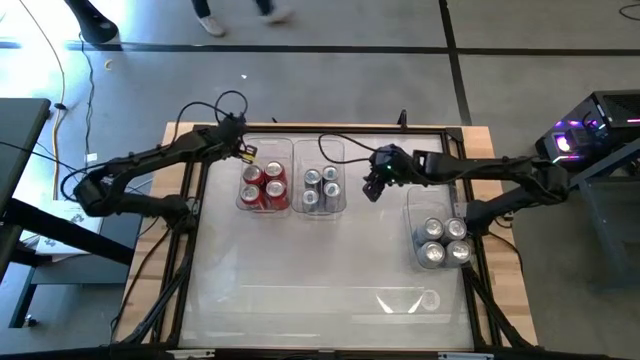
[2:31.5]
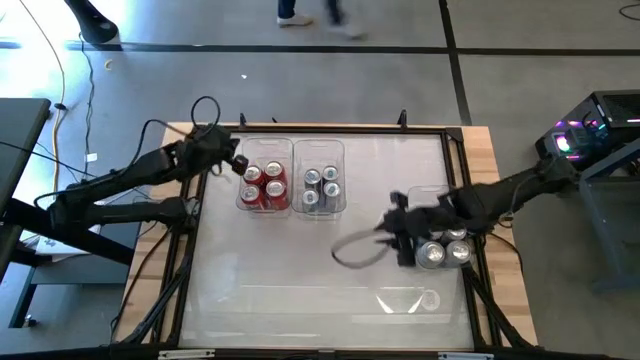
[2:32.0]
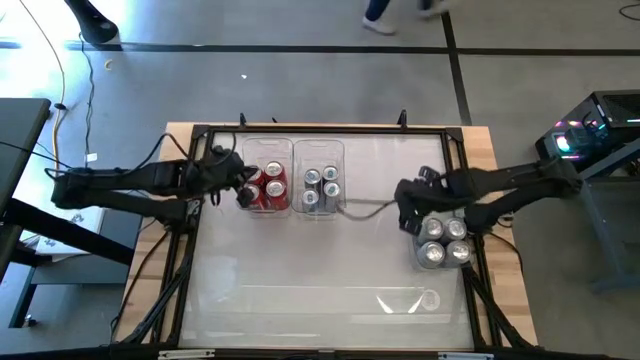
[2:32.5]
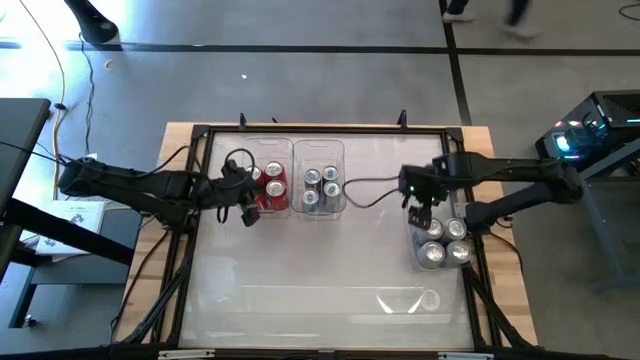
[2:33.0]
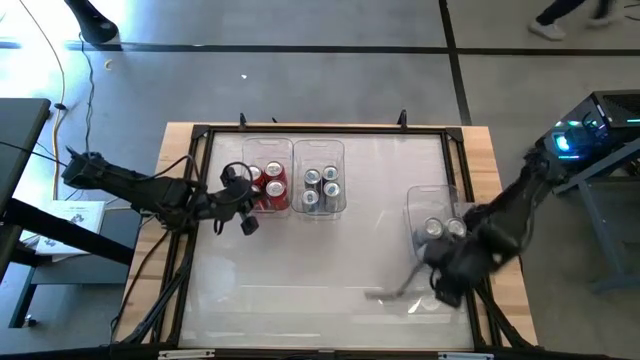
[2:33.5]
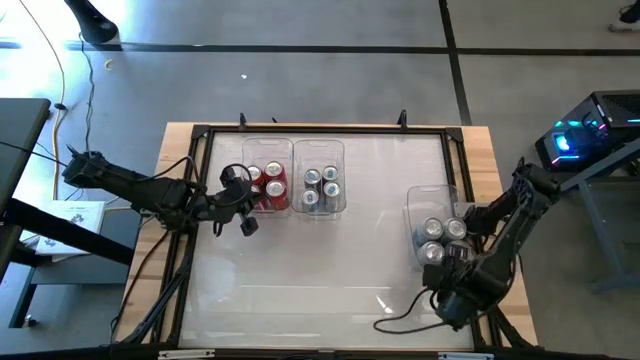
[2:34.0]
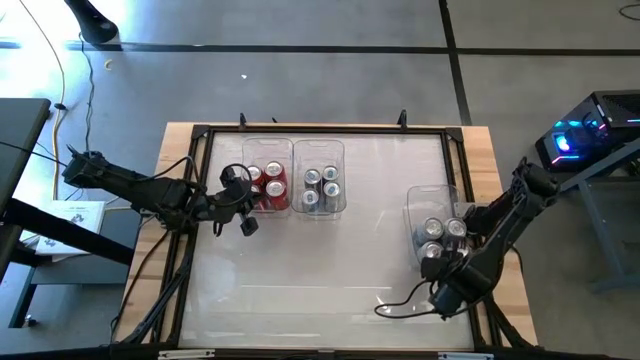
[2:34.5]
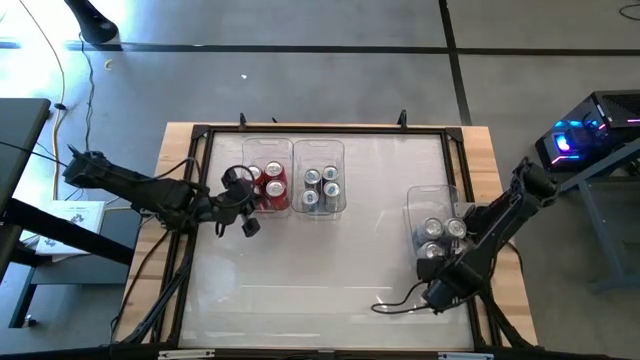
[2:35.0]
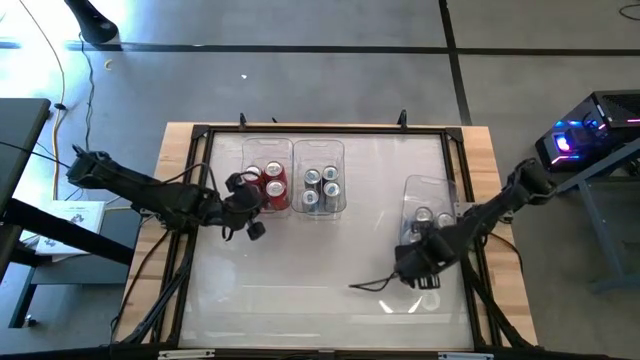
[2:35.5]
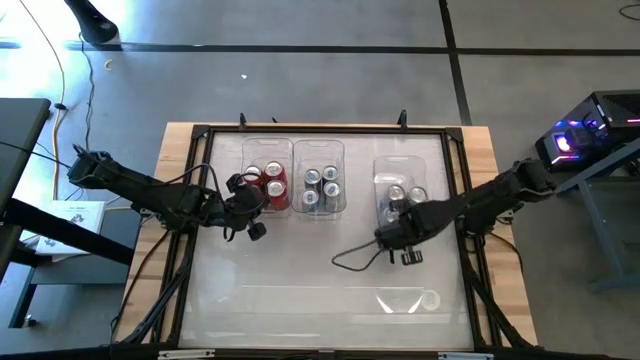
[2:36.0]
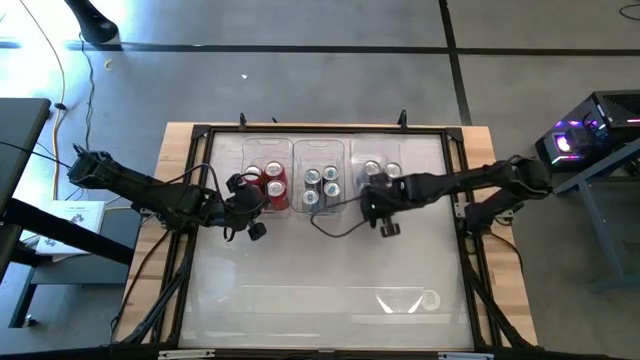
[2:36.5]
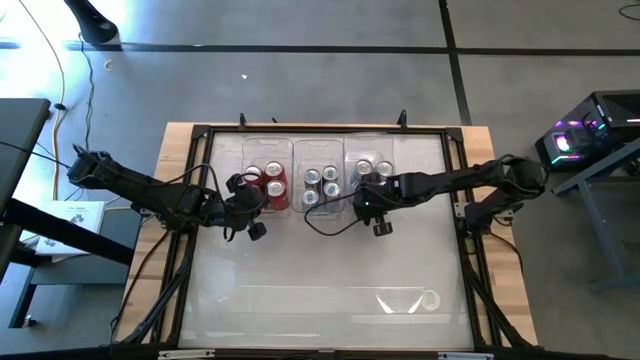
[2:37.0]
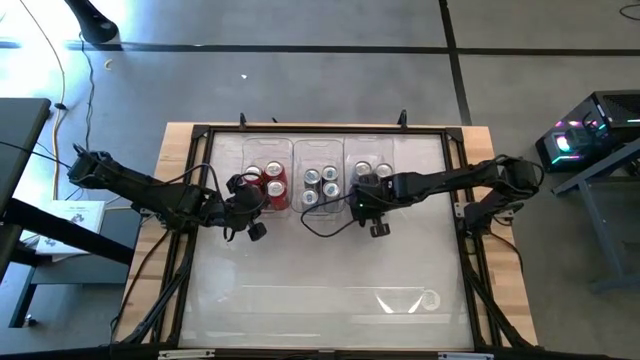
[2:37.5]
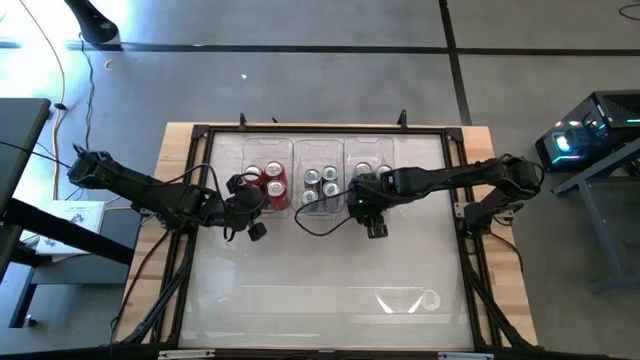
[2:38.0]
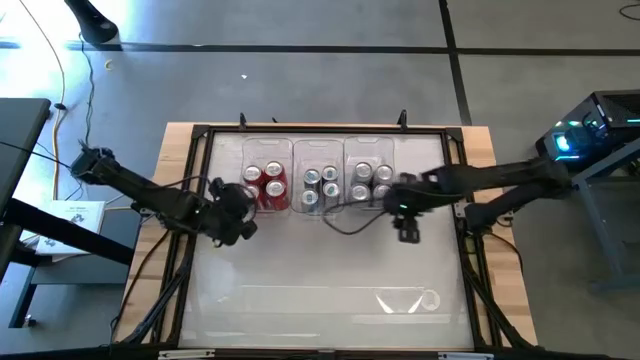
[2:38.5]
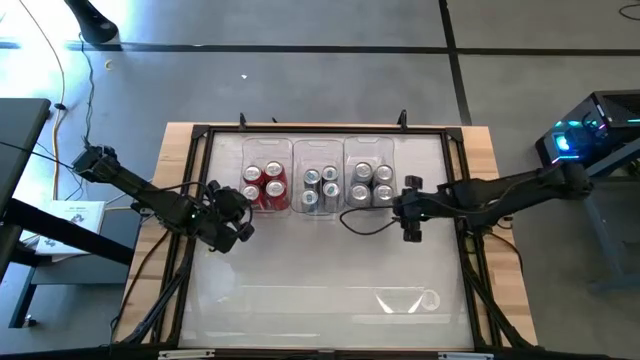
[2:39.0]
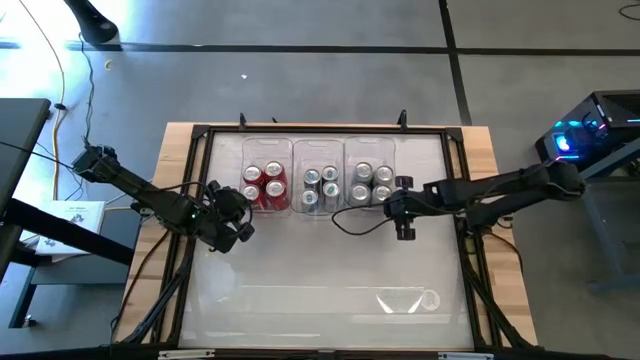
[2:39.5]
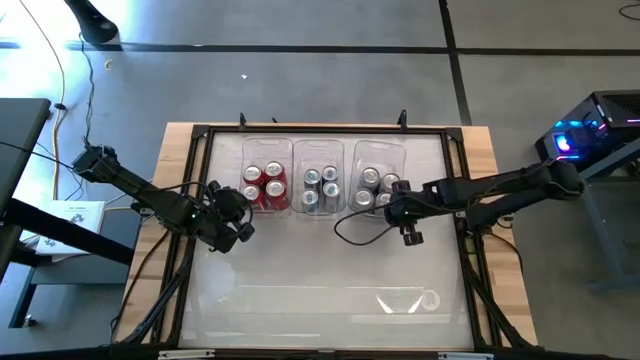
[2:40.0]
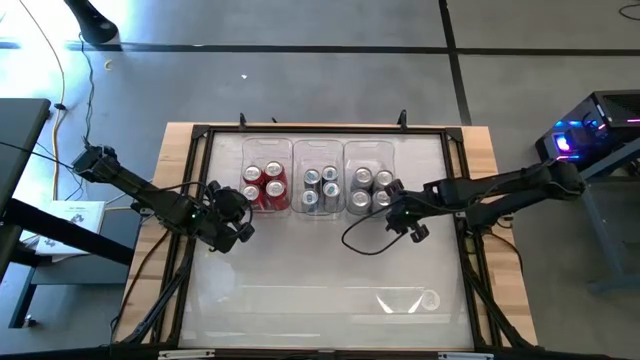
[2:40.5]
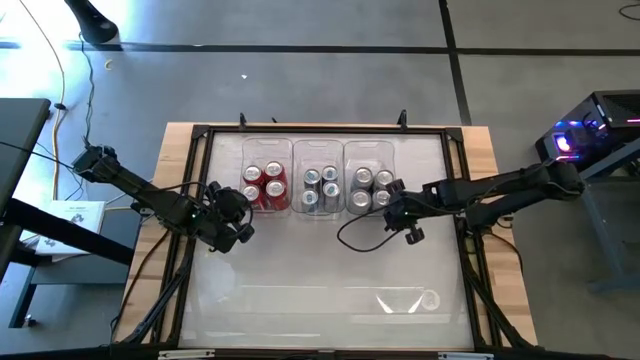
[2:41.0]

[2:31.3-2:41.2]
Task: Sort soda cans
Move the bottom right transparent bin to the top

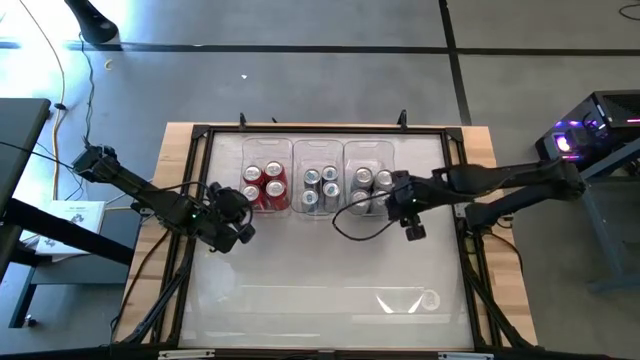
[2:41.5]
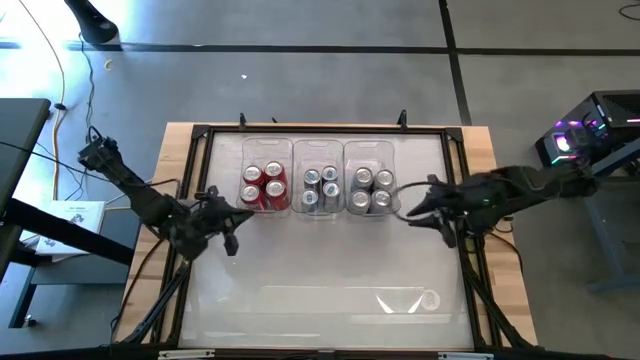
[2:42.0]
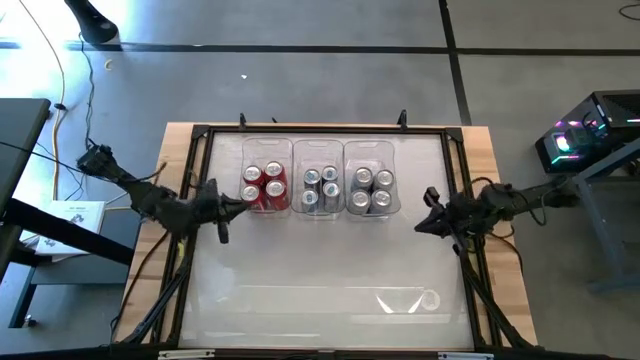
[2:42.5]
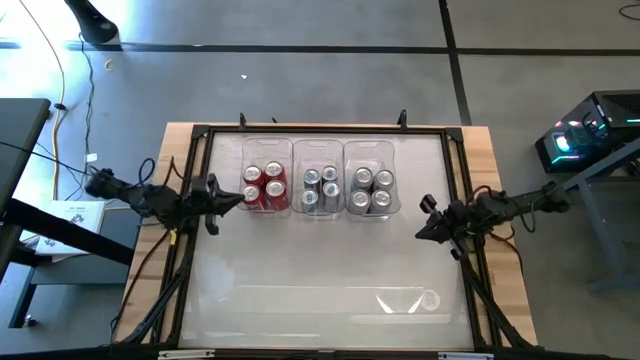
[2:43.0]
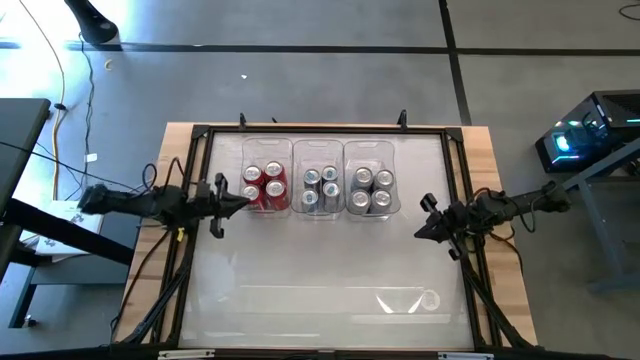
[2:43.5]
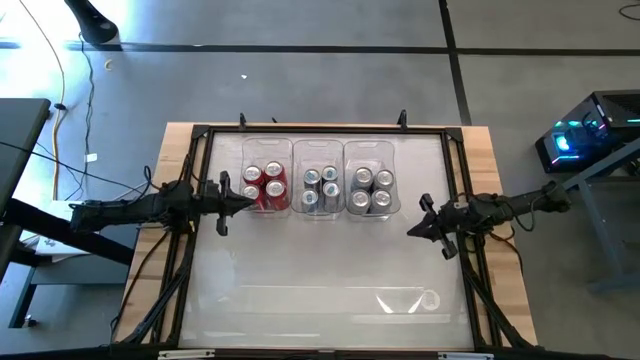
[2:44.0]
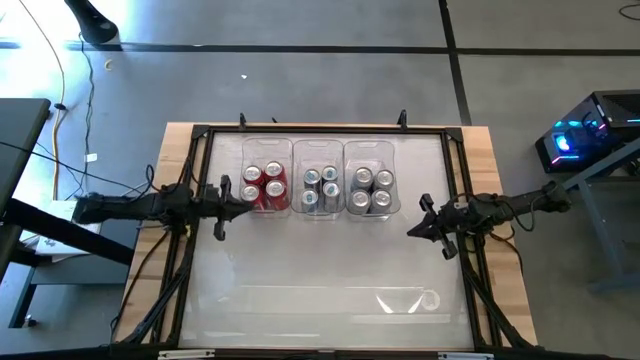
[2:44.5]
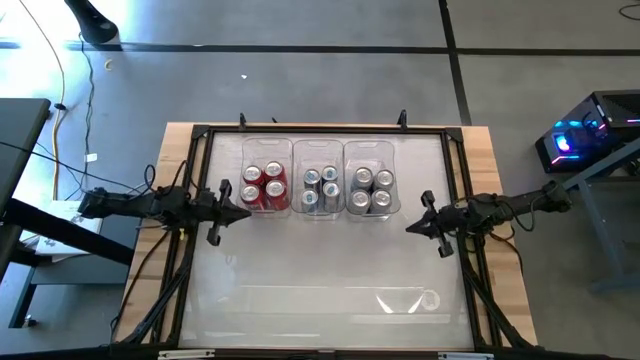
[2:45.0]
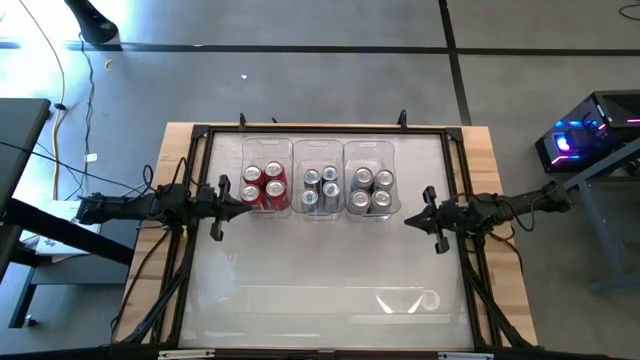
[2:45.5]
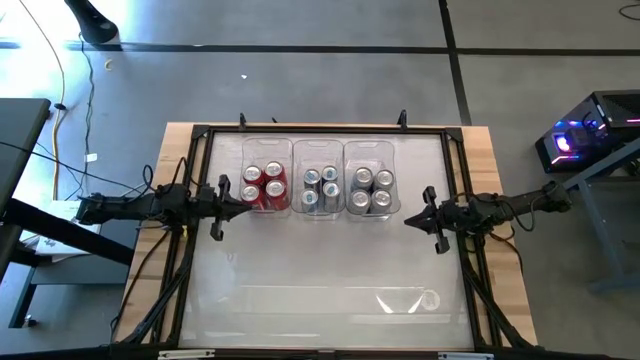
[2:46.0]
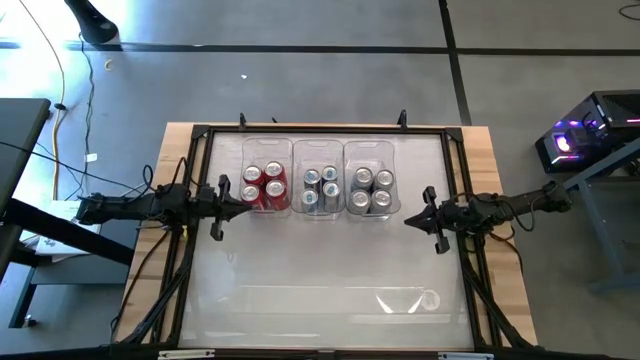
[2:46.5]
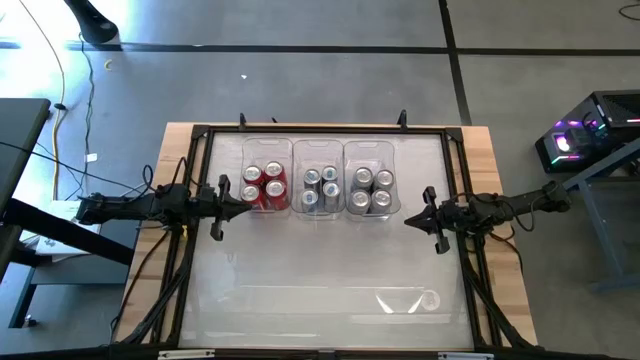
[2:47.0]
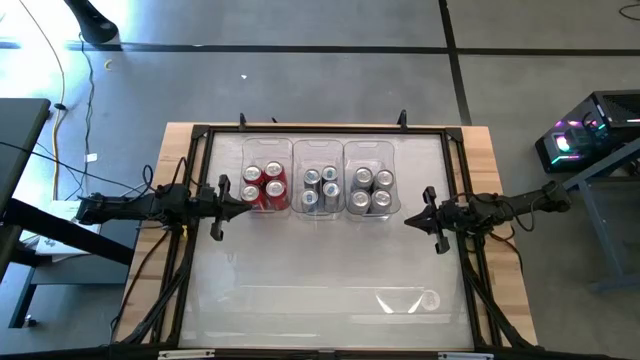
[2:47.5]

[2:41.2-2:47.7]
Return to Home Position

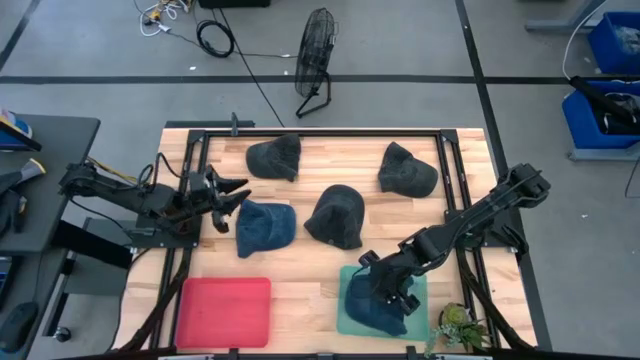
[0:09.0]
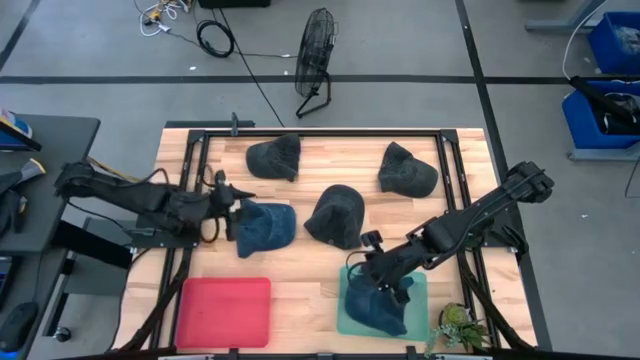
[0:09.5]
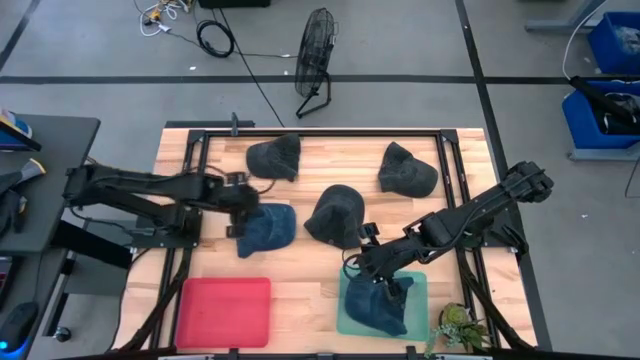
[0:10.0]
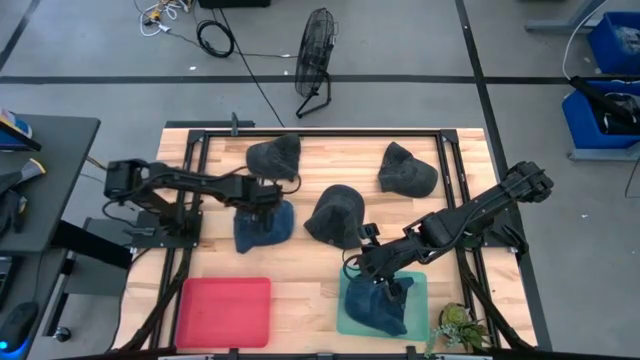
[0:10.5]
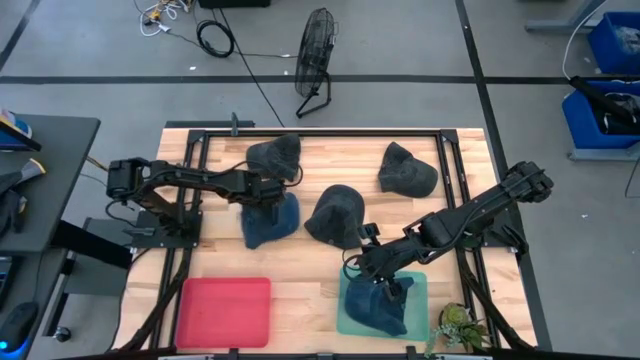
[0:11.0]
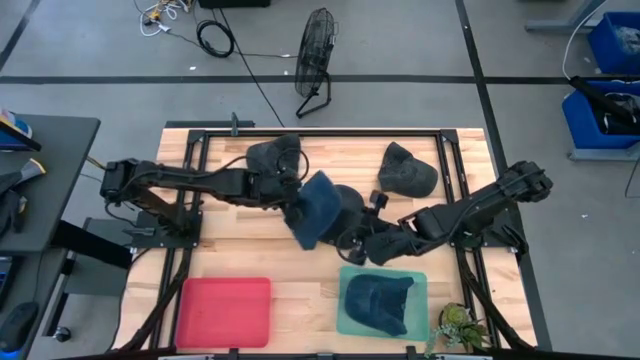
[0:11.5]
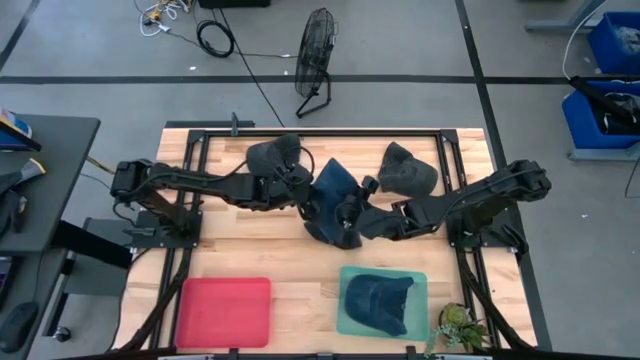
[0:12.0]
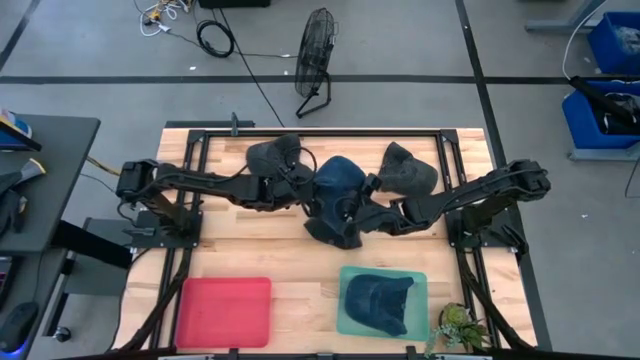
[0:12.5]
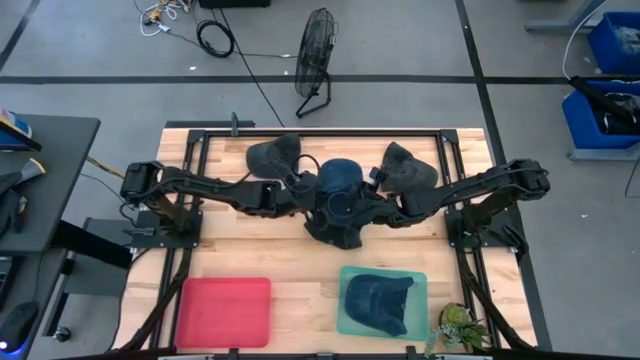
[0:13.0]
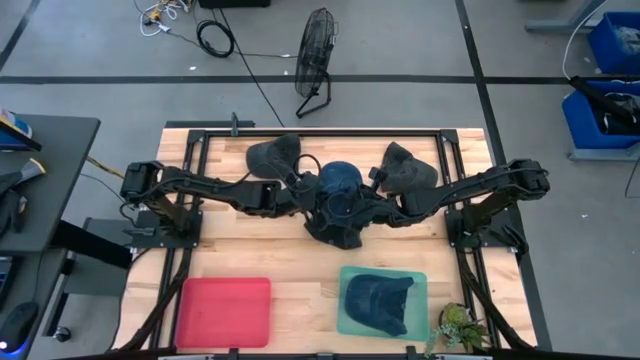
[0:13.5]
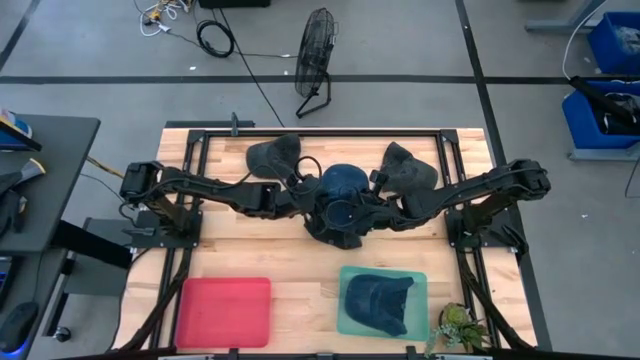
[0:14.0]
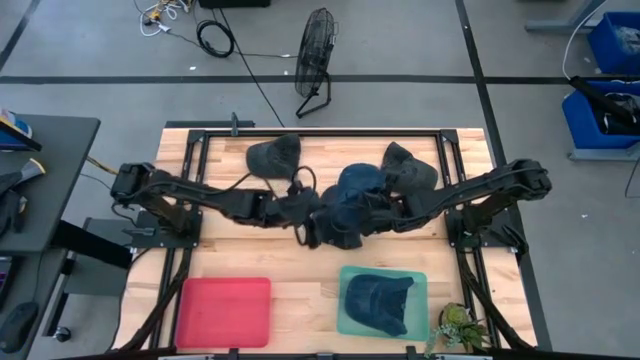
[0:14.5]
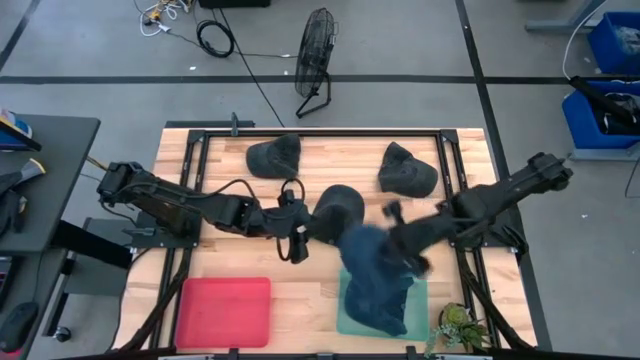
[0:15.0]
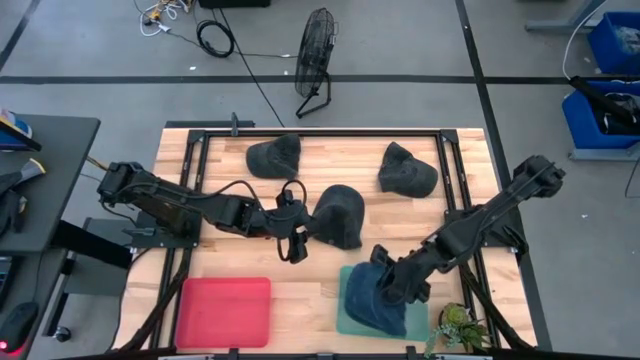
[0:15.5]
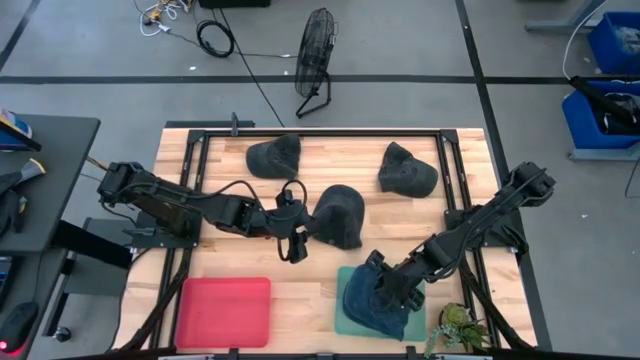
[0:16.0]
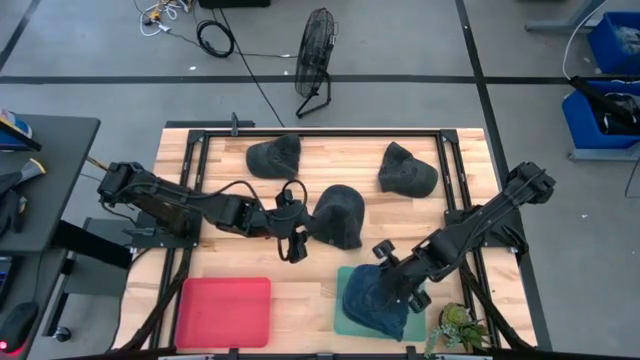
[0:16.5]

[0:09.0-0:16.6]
Task: Pick & Place hat
Put the dark blue cap into the green bin
